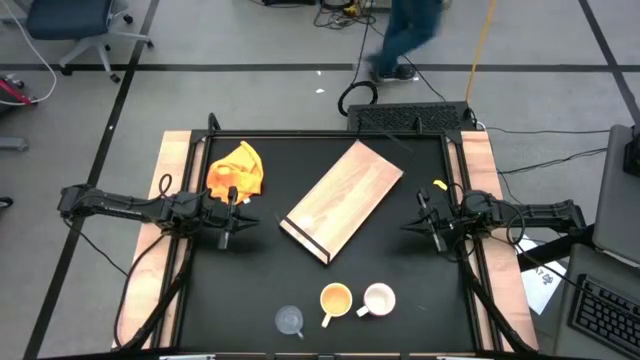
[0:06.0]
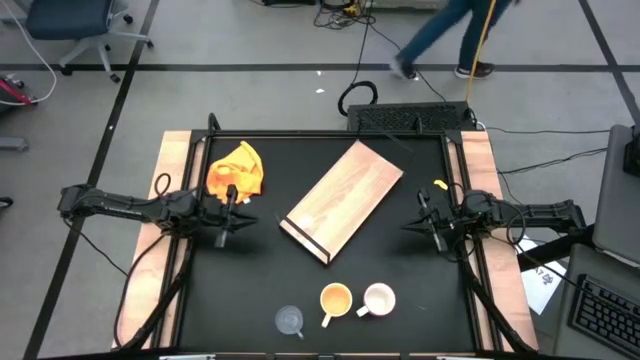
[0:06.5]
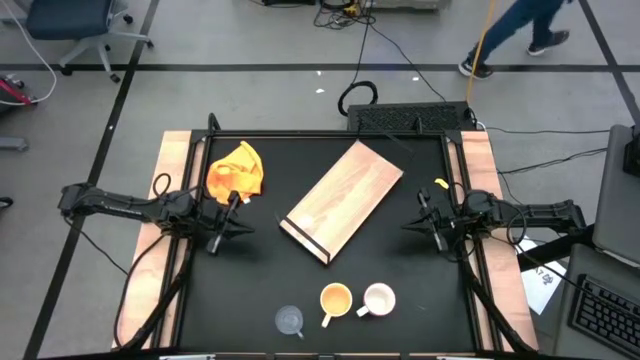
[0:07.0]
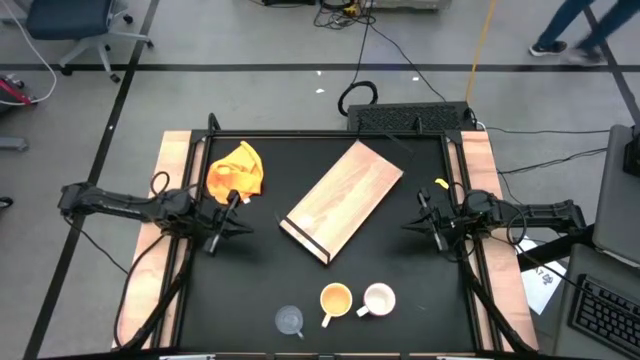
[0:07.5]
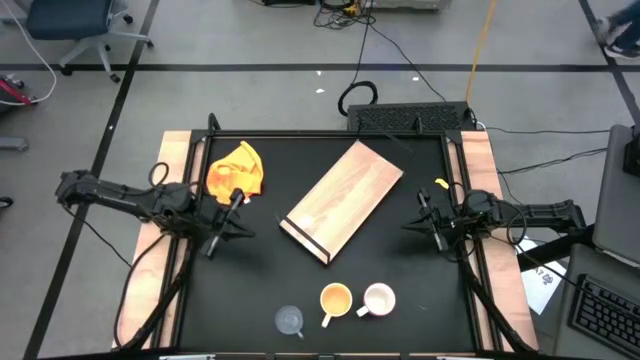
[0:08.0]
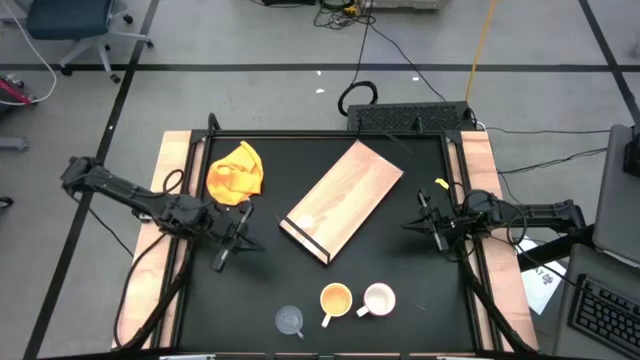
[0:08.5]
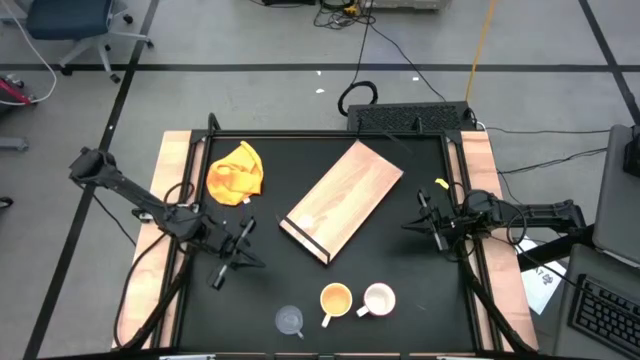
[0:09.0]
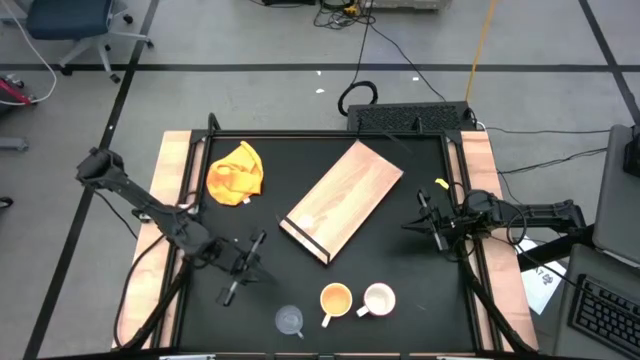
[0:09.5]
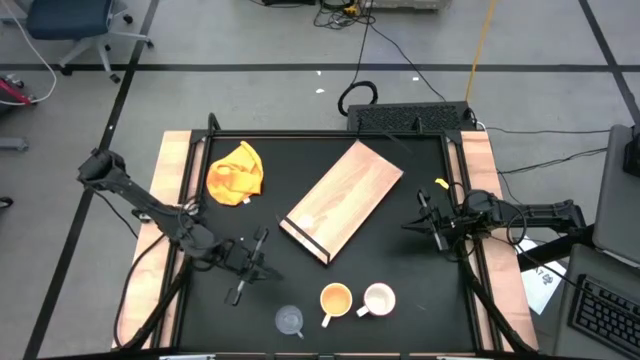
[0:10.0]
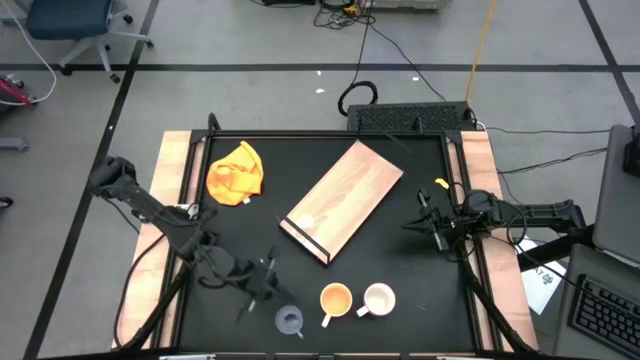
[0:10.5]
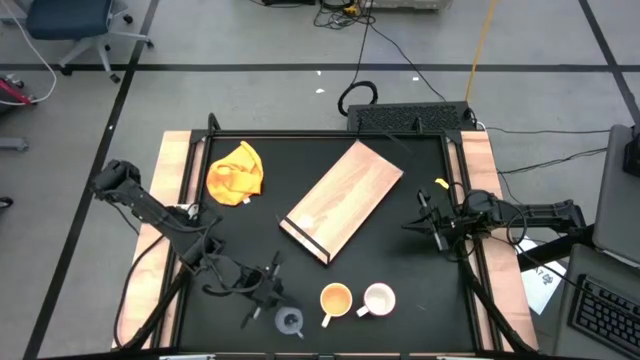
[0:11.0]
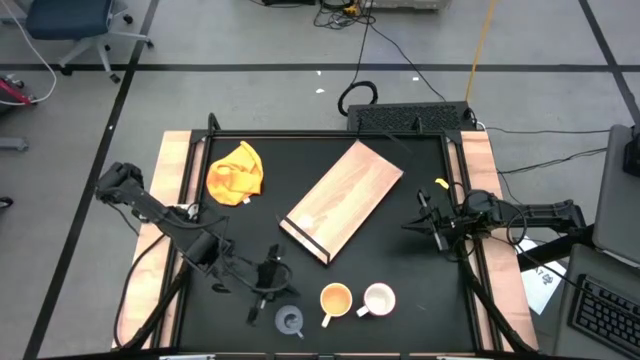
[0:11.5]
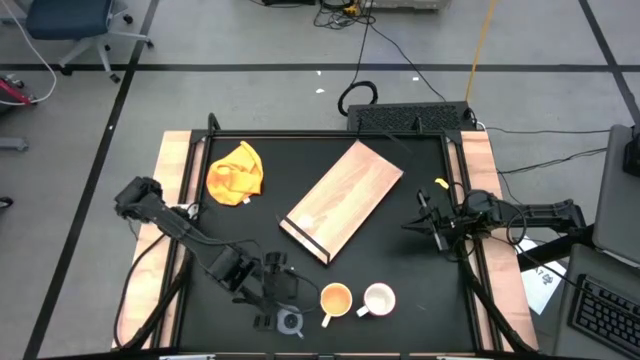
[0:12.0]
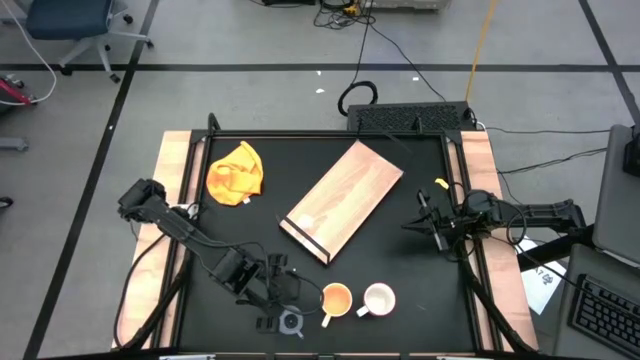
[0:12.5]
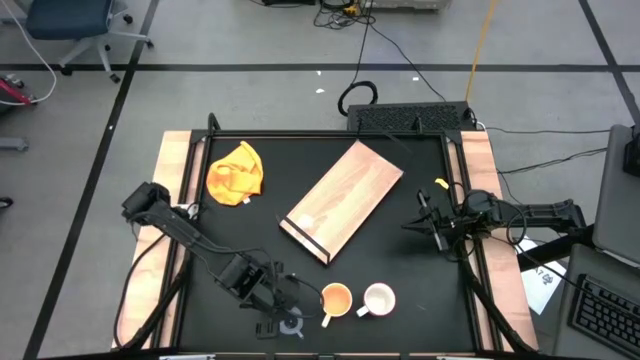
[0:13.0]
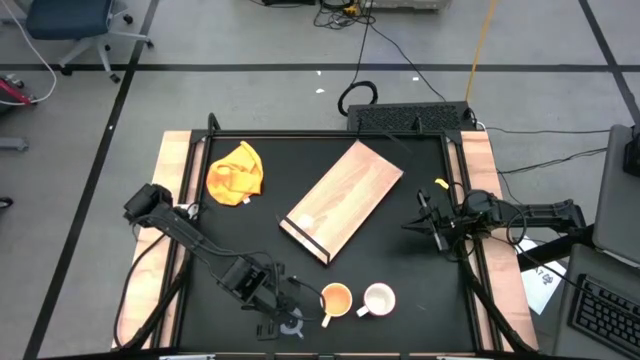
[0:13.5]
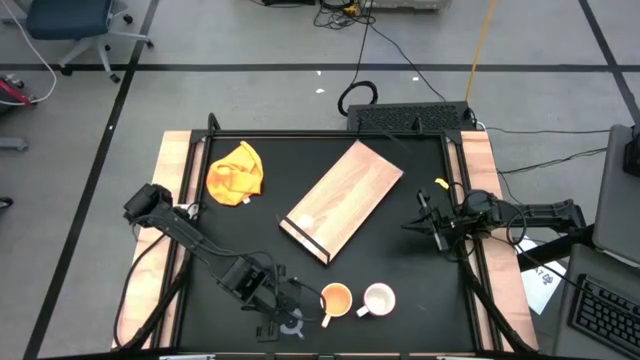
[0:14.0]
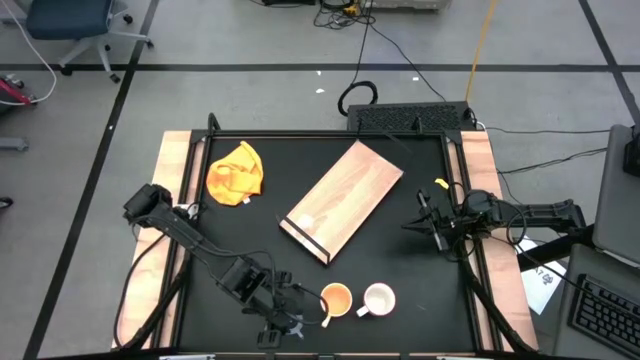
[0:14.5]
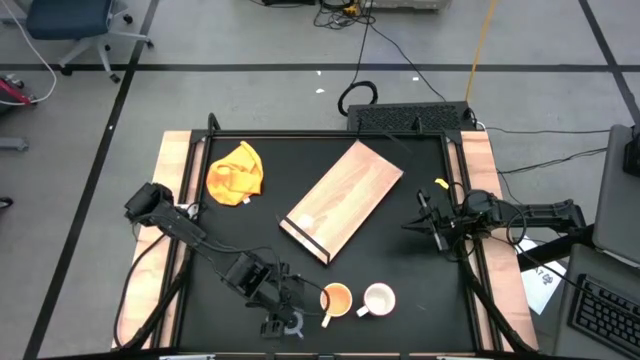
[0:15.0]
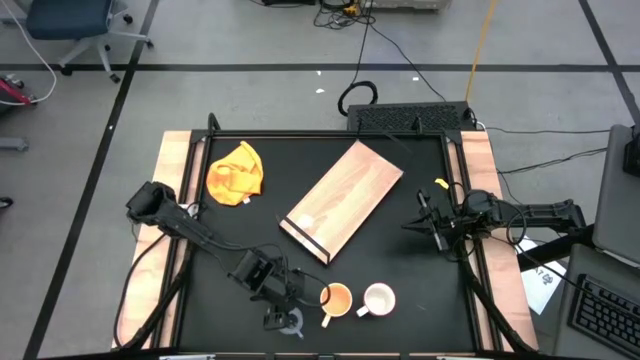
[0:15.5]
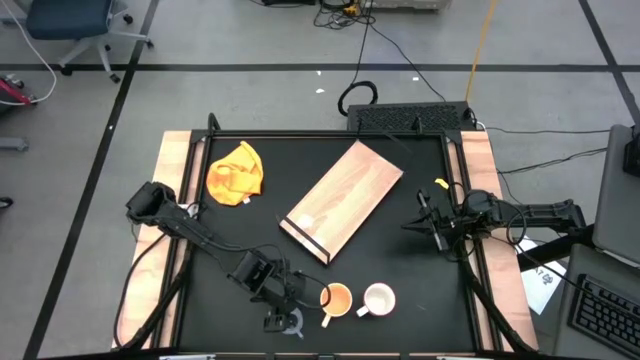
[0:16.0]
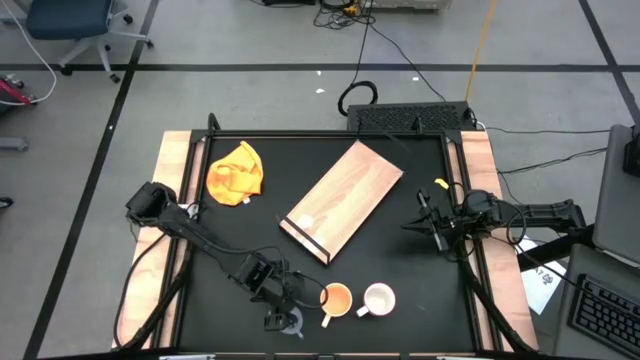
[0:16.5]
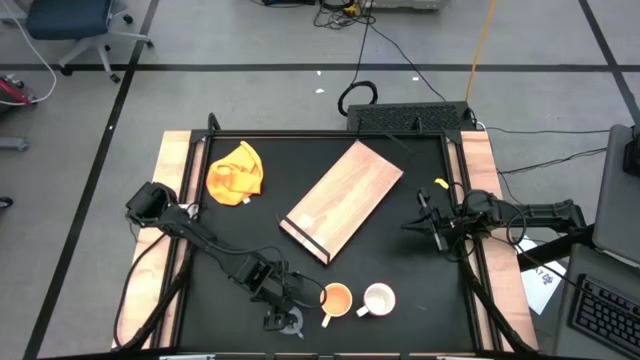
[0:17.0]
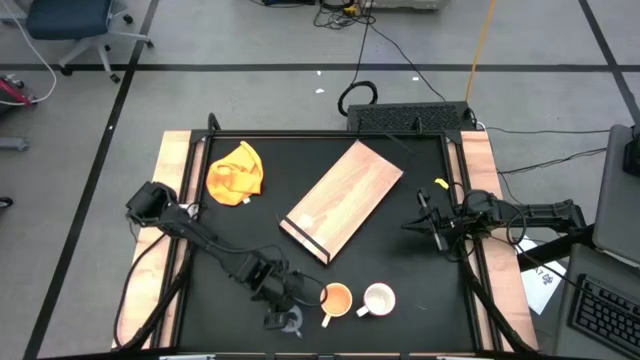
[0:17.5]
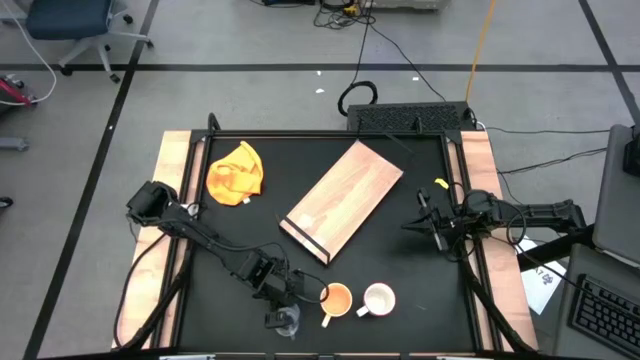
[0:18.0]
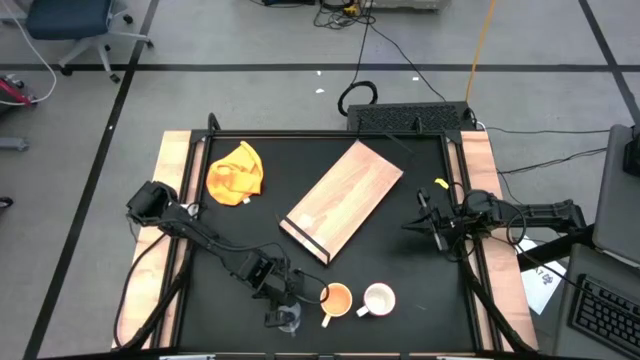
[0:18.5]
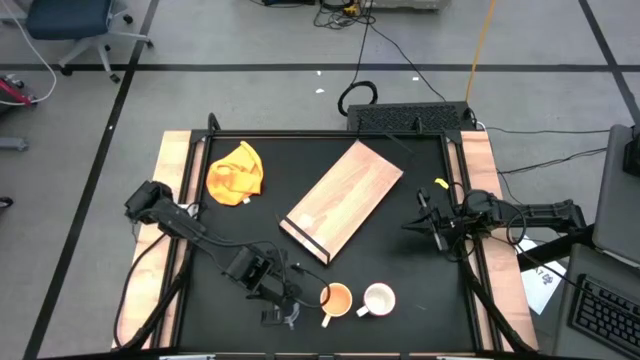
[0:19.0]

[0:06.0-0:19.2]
Task: Stack small to large cups/mugs on shelf
Put the transparent mug on the shelf

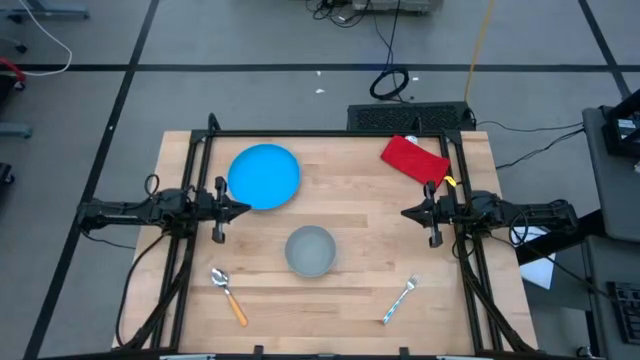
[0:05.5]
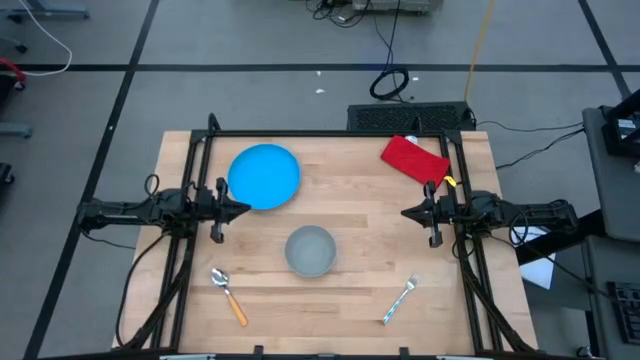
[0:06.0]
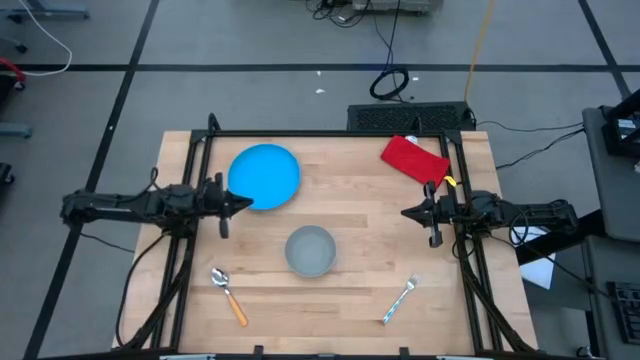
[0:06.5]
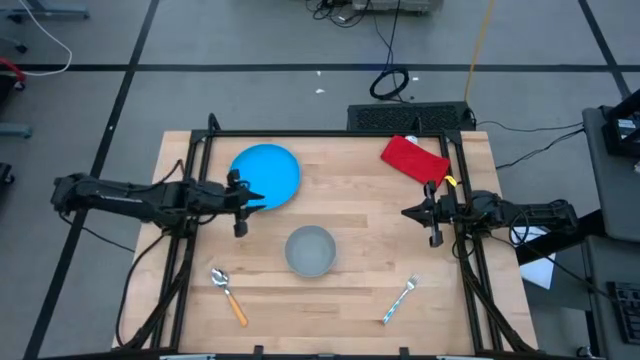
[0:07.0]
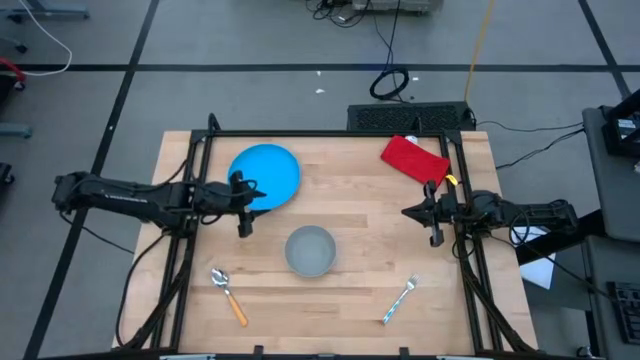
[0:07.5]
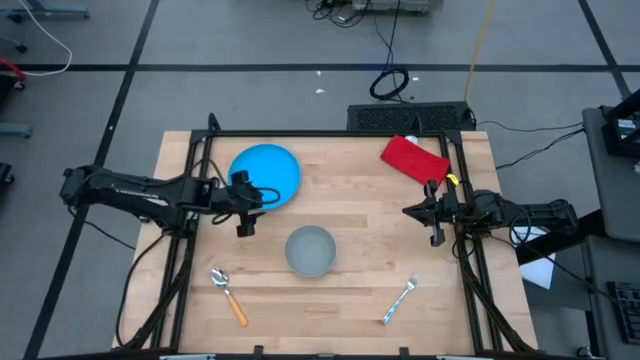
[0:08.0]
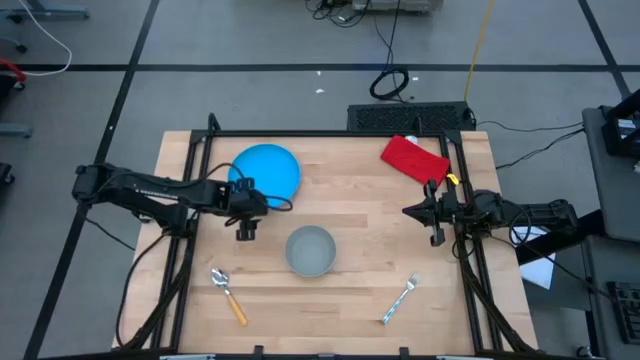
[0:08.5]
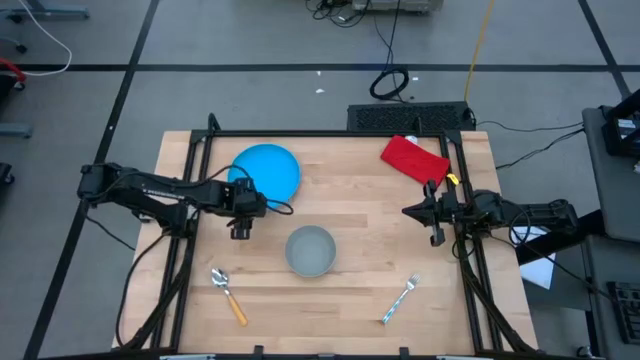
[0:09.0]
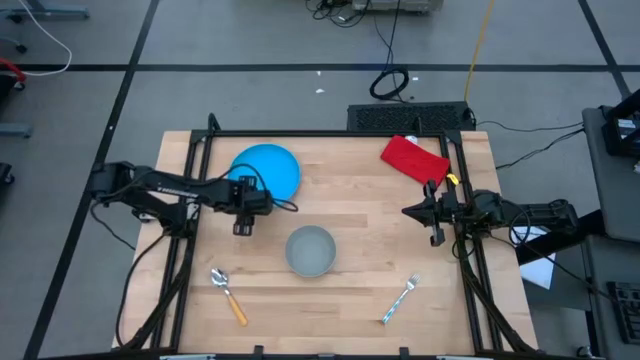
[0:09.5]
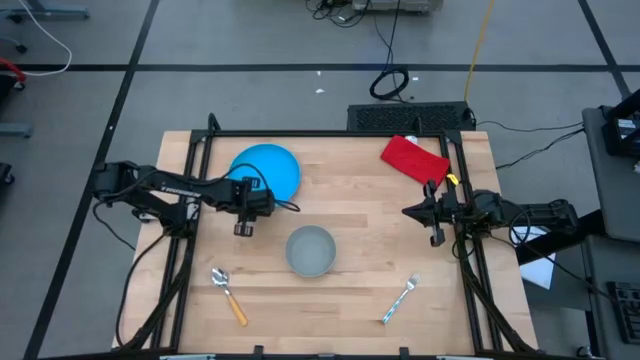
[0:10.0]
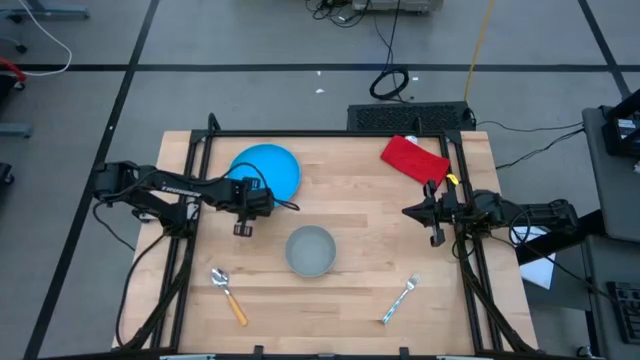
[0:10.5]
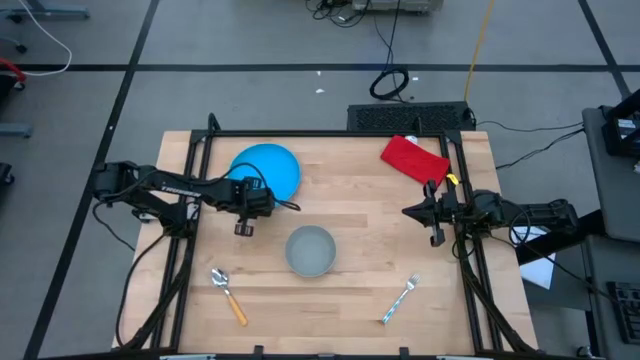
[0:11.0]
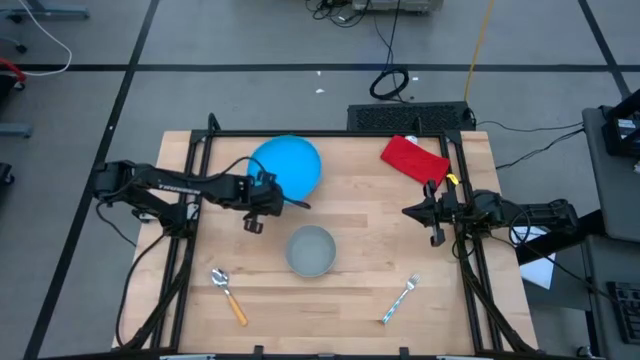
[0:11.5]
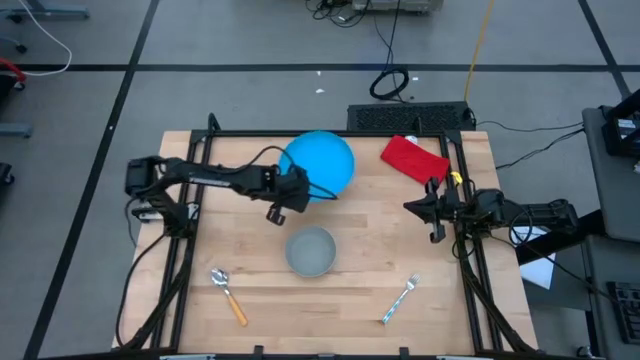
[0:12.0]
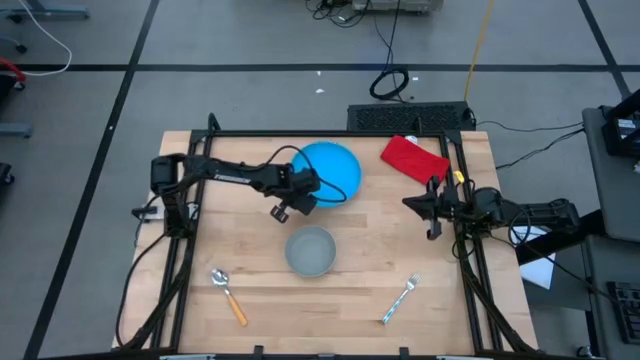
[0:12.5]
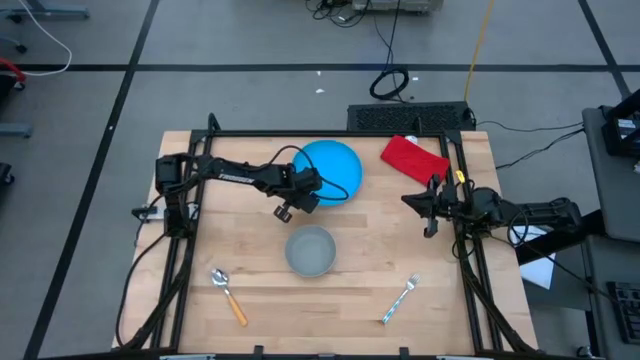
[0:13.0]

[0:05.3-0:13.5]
Task: Pick and place plate/cup/fork/spoon on tray
Move the blue plate to the middle top
